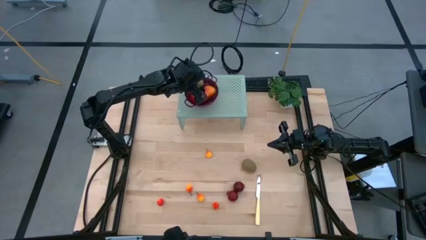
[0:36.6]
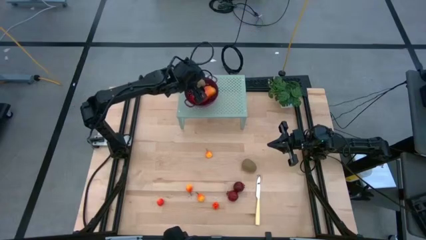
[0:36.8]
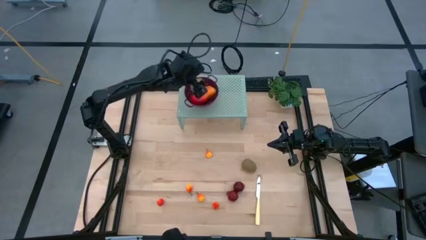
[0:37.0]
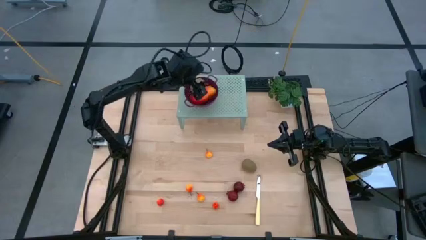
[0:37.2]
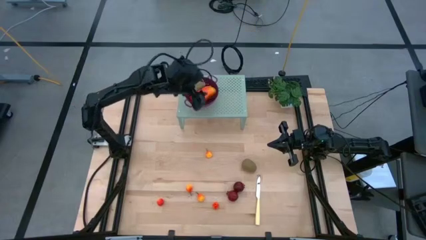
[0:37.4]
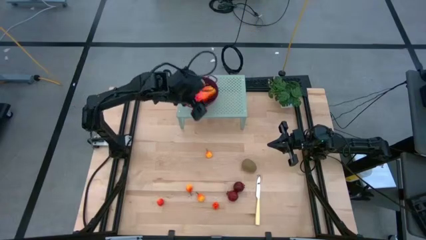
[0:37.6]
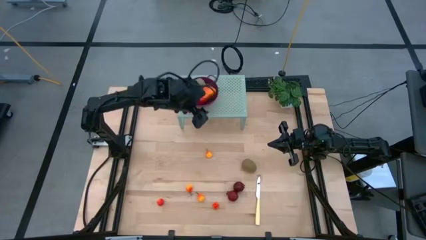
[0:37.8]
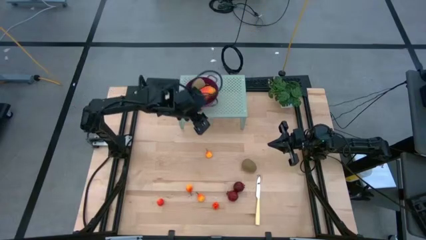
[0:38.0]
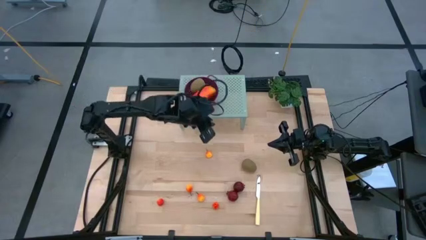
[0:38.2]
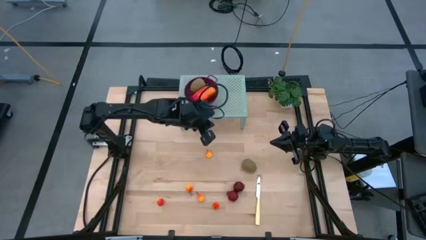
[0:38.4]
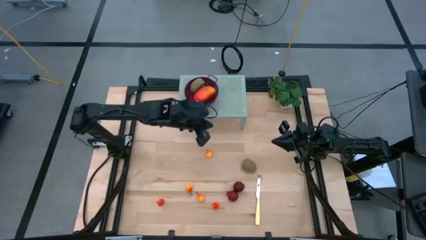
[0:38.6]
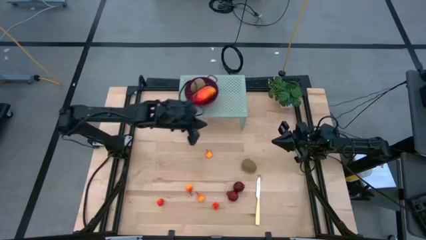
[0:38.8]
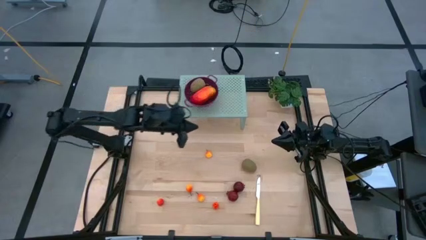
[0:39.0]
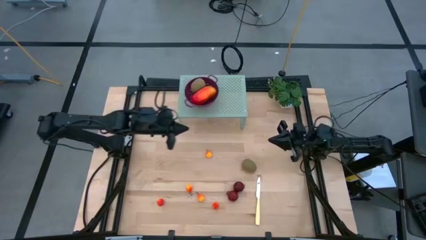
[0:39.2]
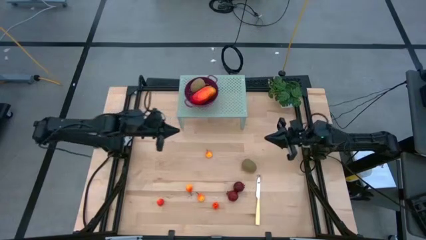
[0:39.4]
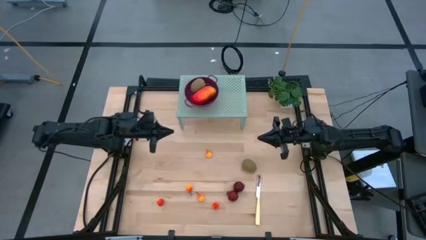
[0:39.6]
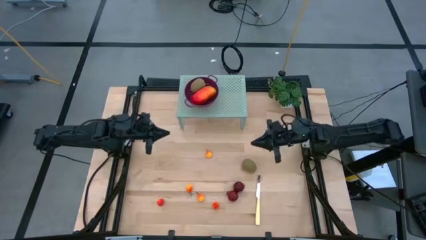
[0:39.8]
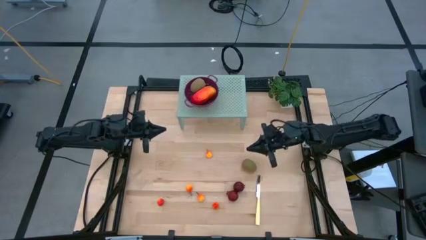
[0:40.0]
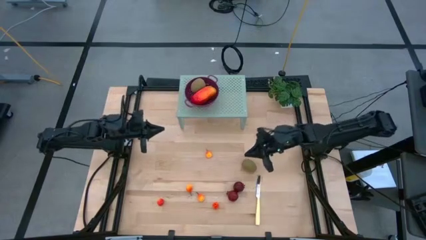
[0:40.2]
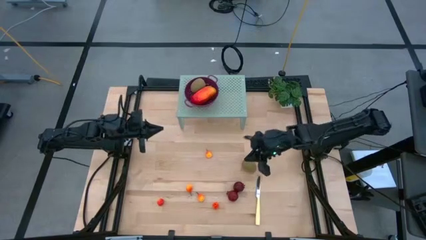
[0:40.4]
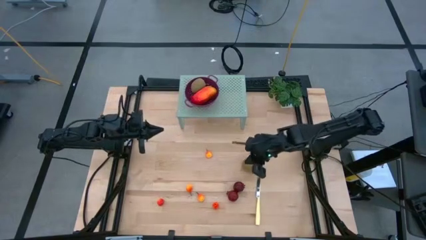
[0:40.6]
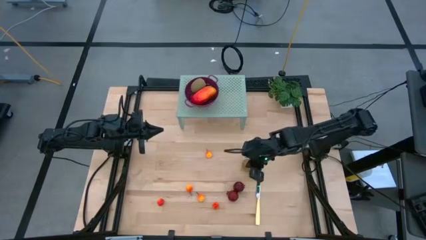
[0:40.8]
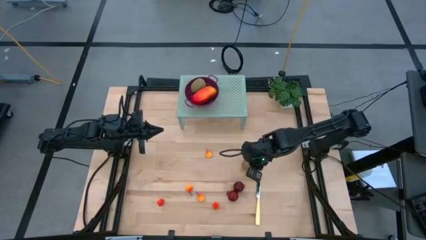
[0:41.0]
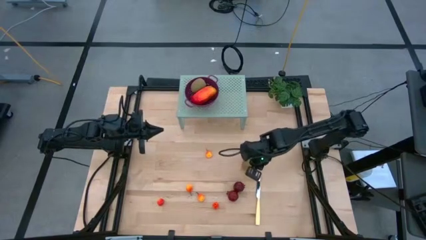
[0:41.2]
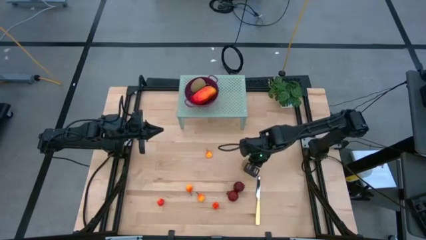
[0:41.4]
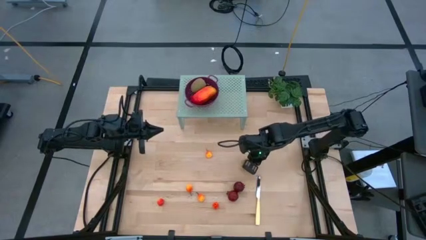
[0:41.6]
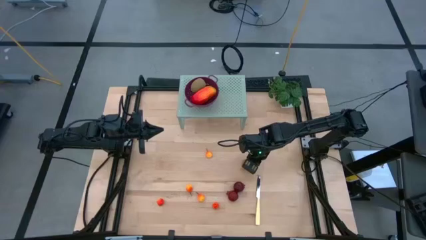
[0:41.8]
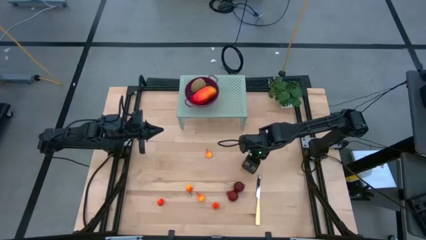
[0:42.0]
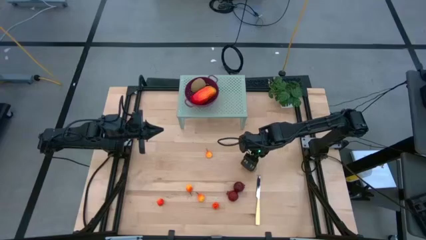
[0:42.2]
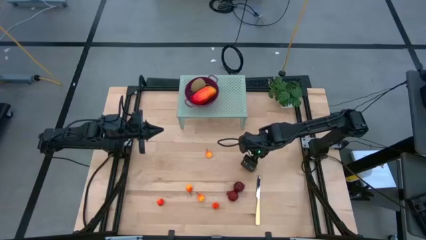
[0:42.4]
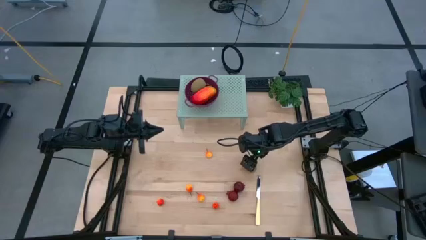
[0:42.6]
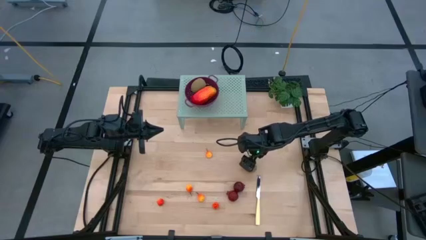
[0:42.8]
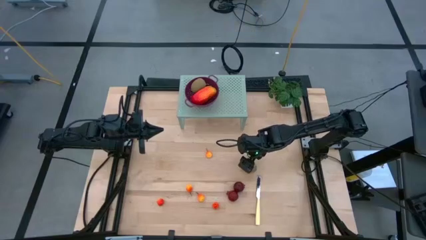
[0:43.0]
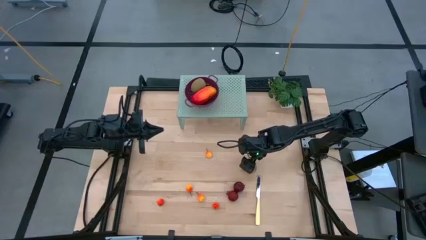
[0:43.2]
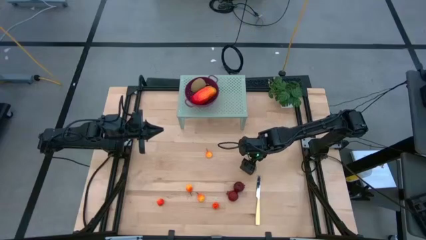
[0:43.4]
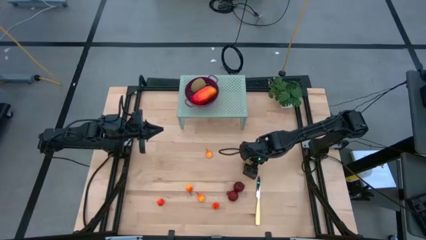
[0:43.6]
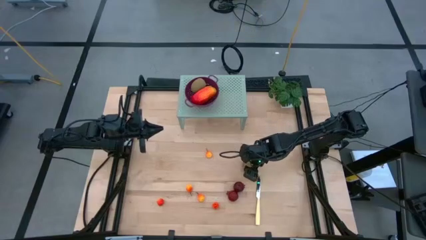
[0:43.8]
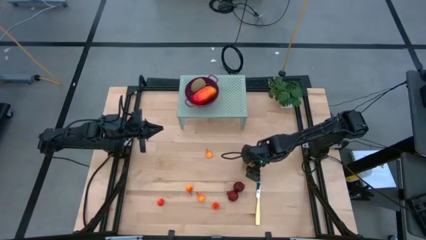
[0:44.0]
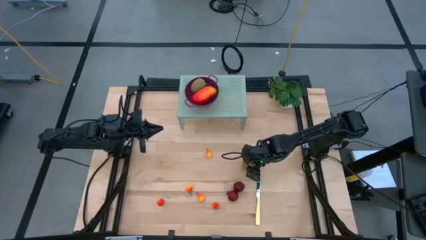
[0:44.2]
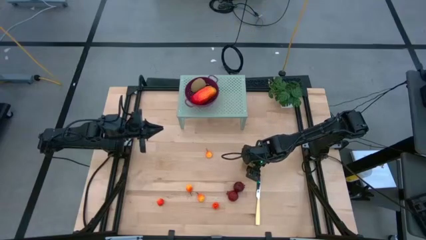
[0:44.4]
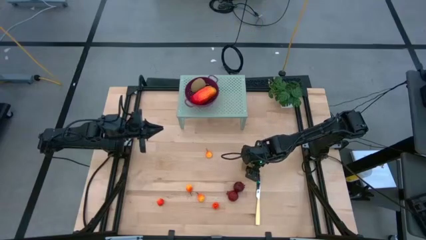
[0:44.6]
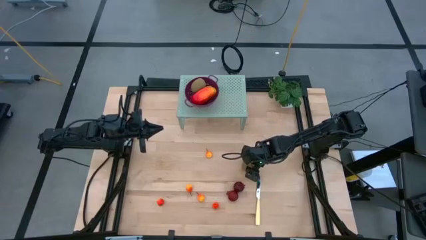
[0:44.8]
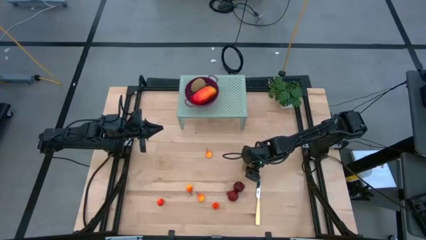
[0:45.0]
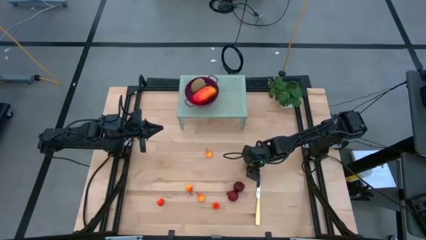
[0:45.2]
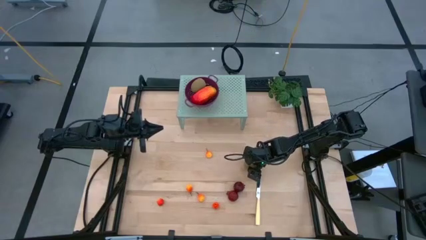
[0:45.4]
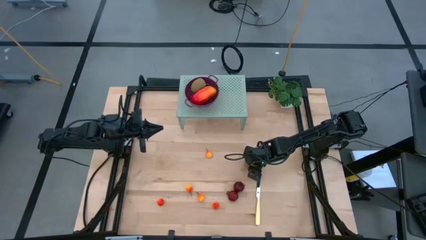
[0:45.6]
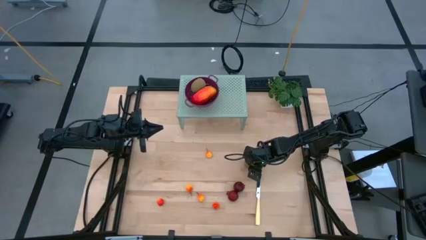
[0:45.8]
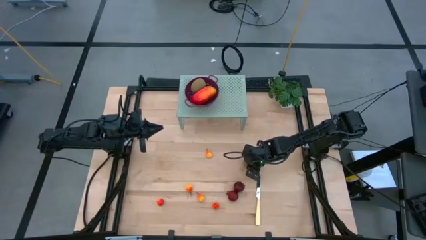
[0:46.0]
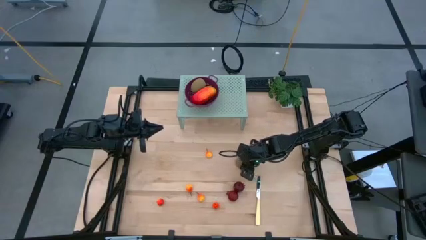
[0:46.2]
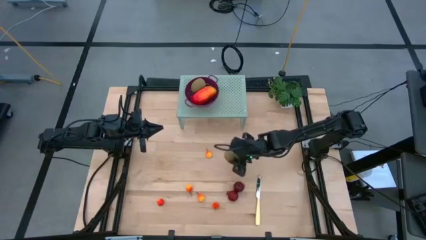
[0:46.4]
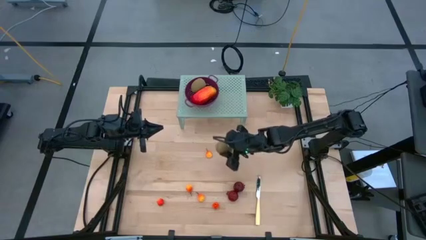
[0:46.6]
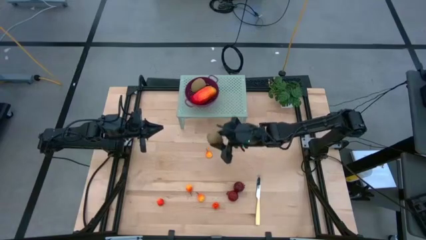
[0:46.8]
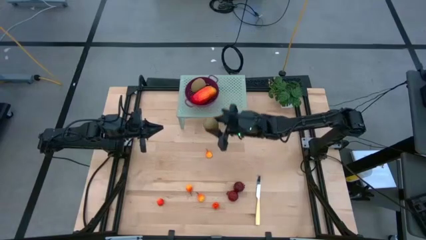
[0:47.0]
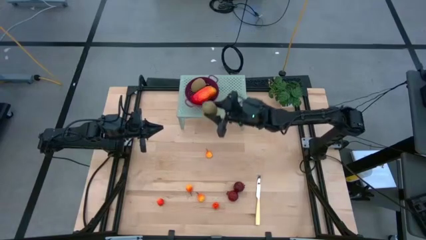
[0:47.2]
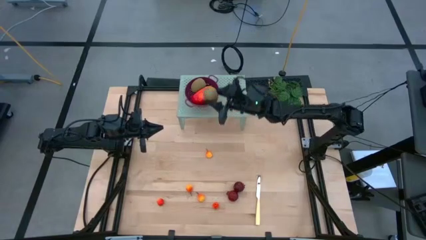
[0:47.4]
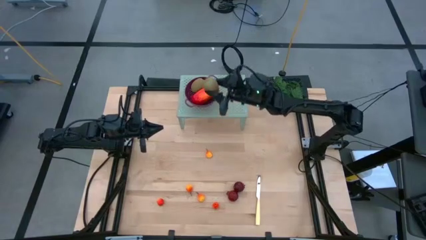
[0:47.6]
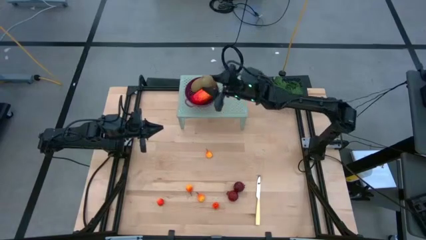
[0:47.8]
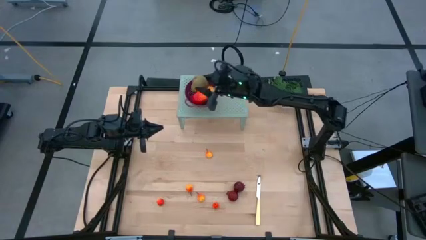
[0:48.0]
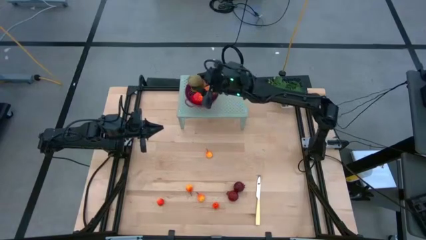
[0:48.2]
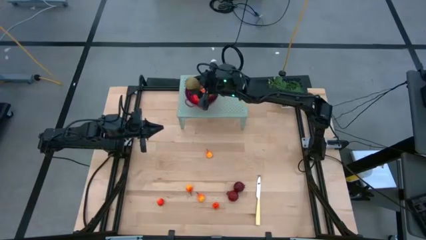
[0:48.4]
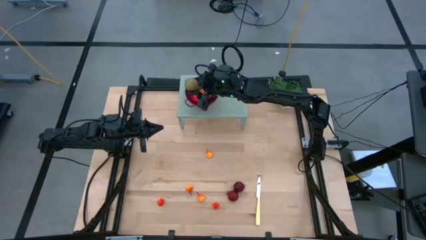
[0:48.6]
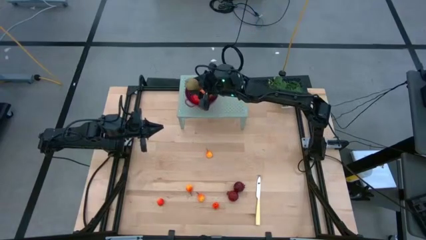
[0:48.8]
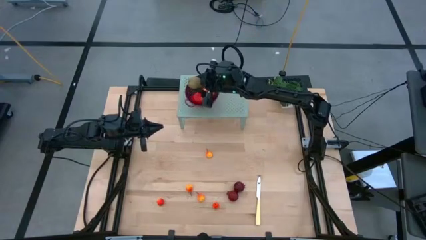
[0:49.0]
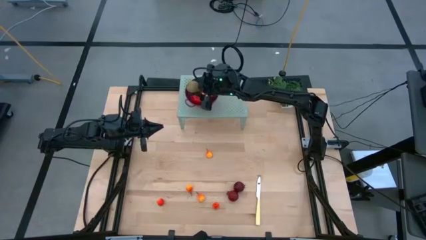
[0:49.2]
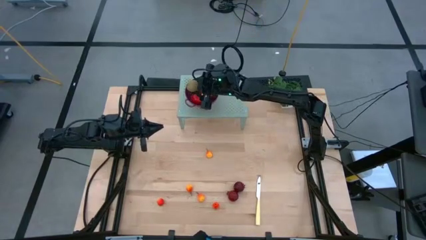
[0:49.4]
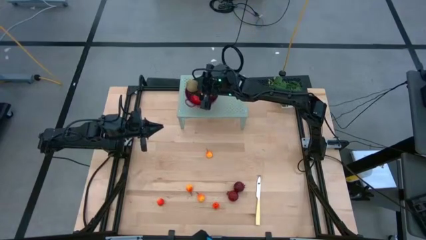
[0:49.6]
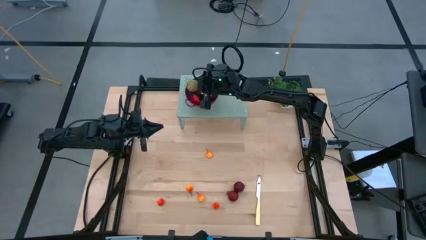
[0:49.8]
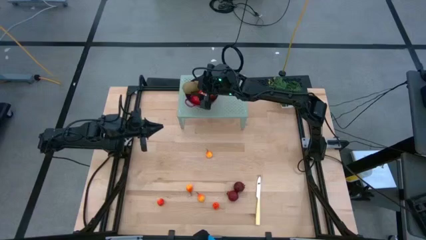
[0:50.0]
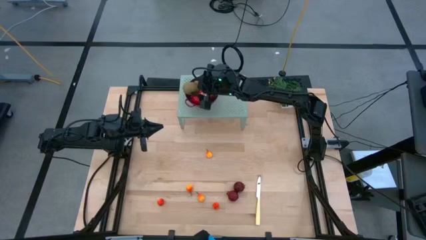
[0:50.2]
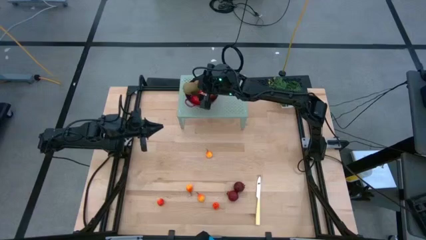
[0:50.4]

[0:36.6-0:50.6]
Task: Pick & Place Fruit
Put the brown kiwi in the red strainer bowl on the shelf
